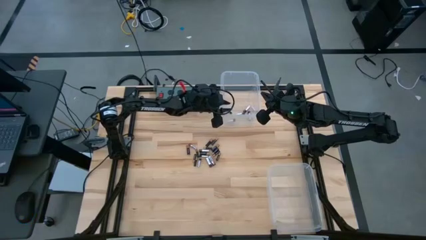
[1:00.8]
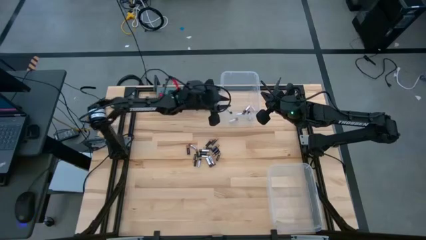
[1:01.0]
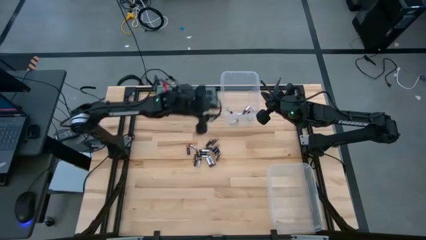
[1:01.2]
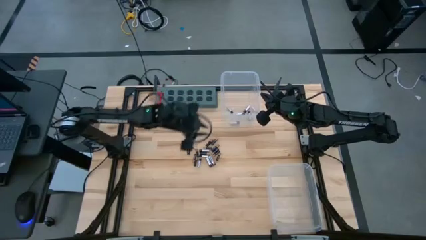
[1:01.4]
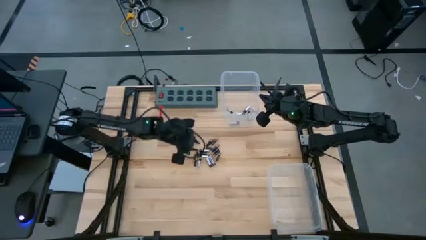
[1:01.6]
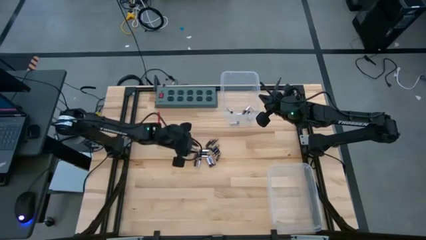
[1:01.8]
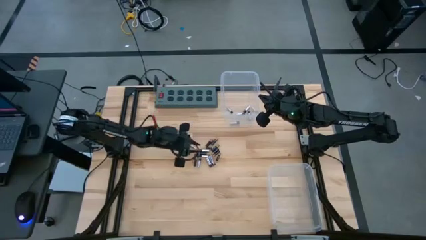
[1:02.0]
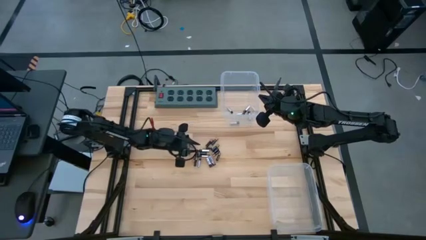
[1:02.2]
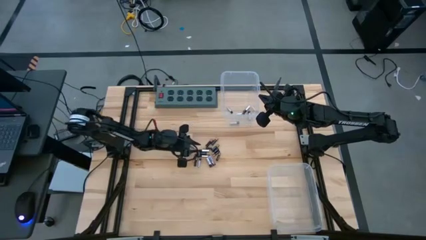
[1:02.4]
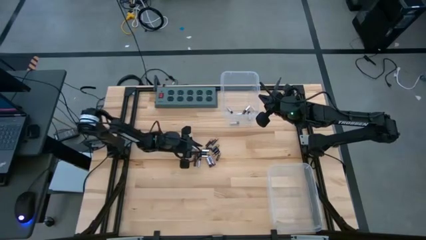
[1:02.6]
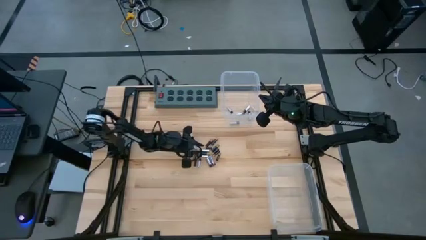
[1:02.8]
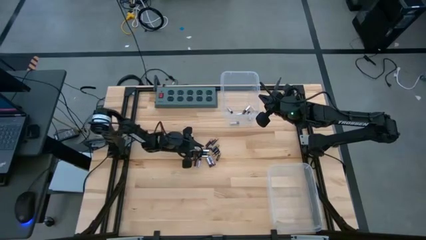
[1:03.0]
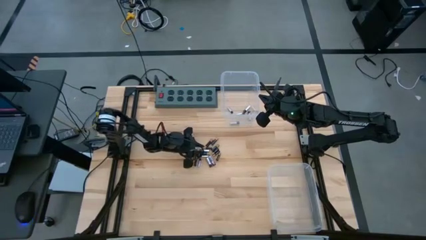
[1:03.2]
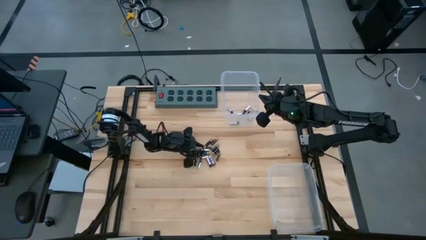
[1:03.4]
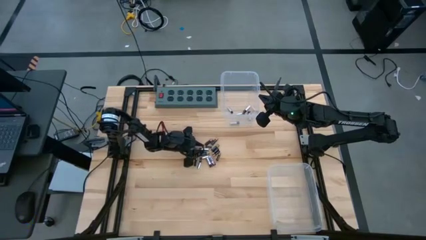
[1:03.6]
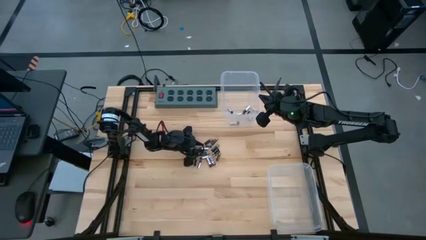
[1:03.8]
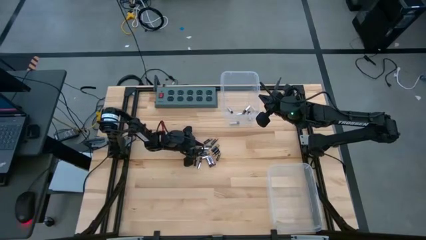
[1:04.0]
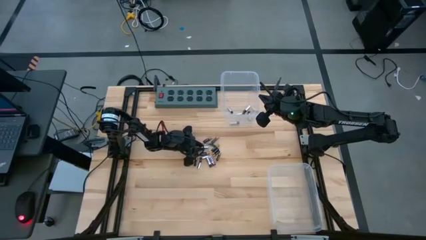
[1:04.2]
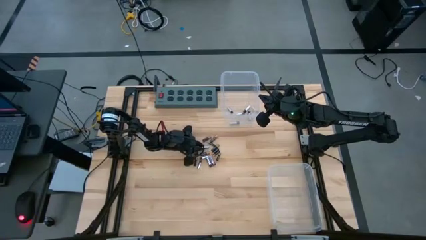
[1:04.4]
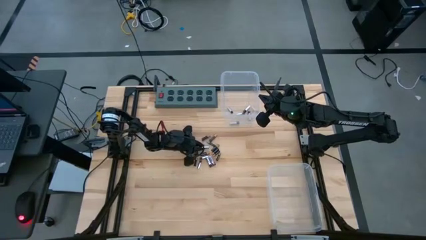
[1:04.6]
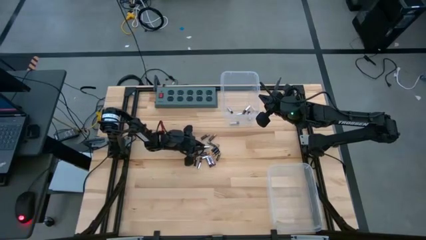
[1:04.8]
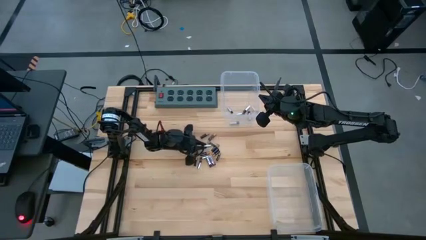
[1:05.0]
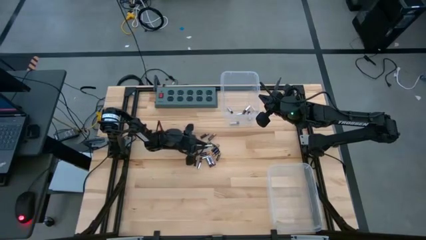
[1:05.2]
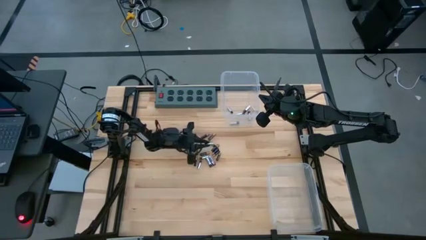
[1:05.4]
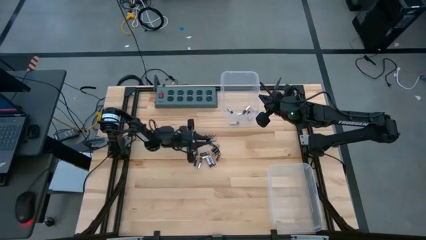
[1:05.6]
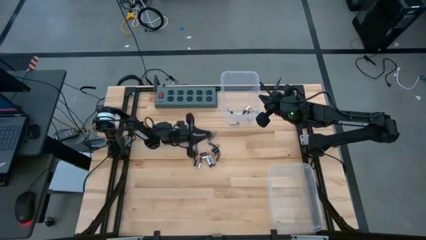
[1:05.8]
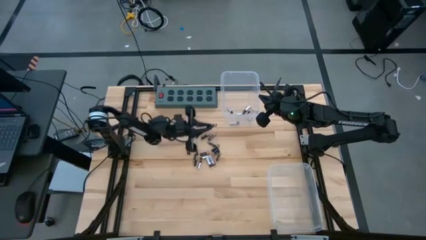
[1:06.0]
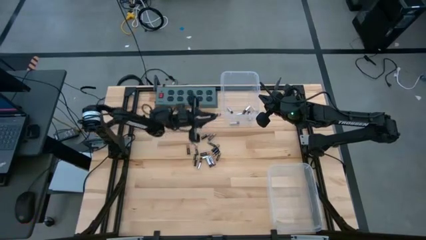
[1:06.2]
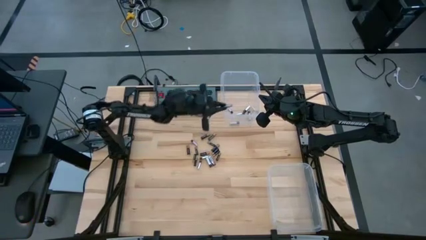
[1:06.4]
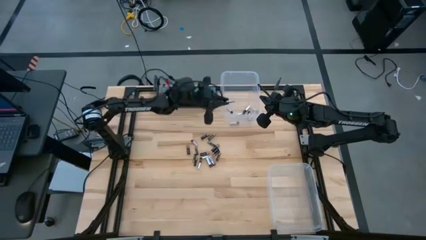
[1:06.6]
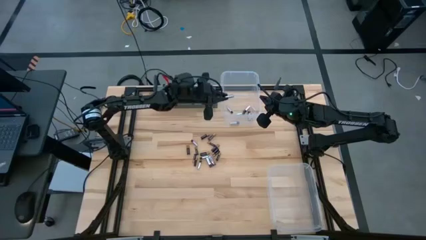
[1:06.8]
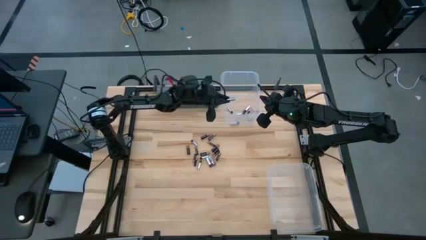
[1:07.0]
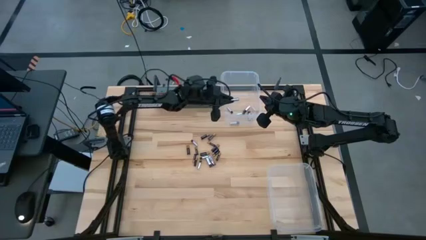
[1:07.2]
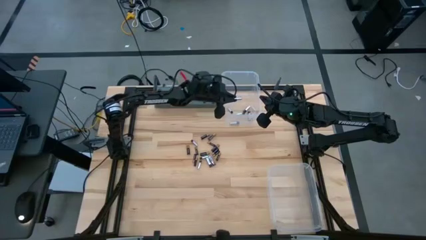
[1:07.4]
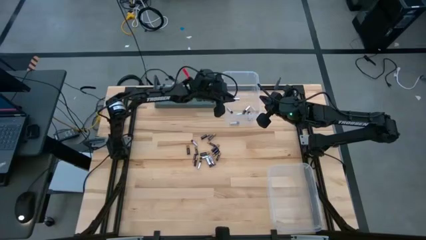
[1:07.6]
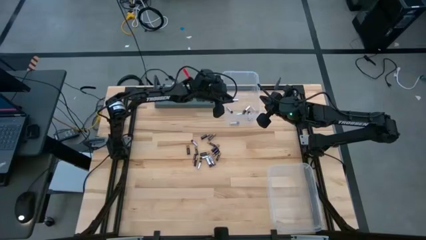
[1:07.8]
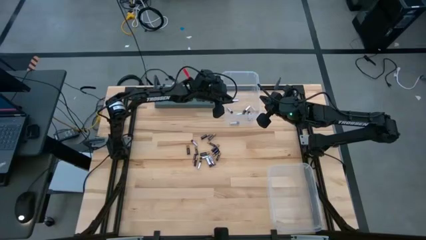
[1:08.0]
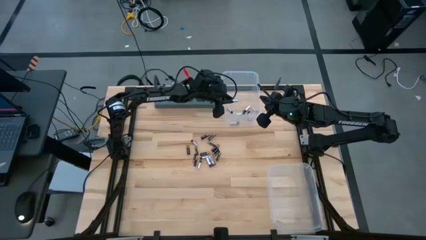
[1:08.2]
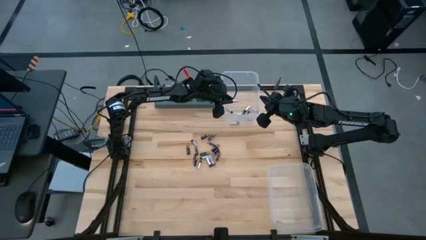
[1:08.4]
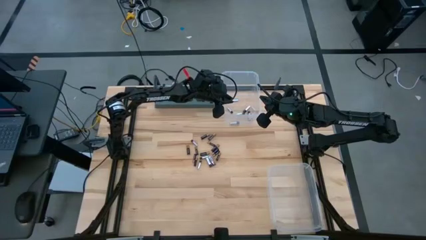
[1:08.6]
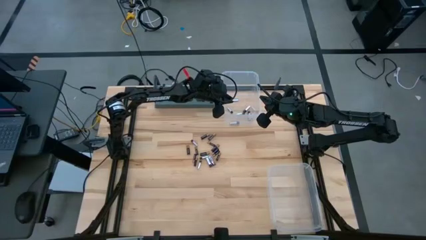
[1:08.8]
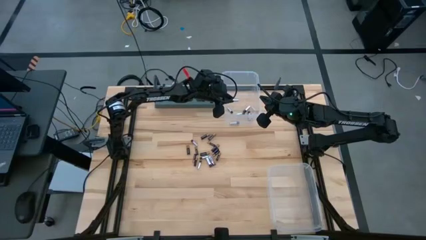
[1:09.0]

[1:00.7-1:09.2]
Task: Sort batteries
Put the silver battery into the top transparent bin

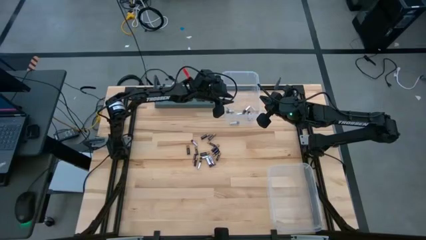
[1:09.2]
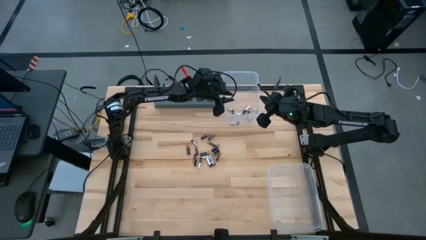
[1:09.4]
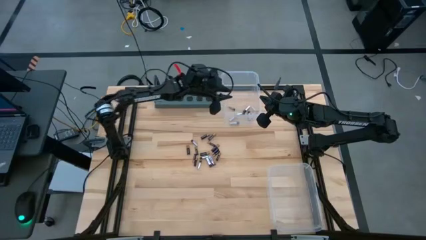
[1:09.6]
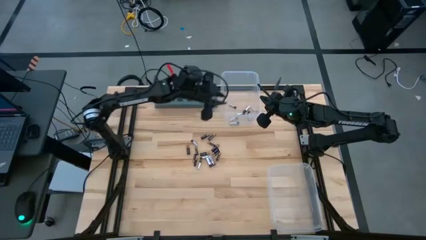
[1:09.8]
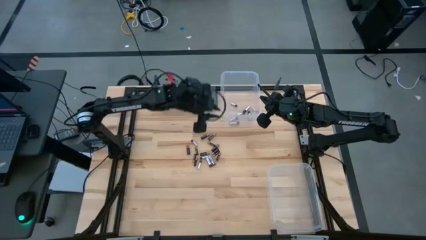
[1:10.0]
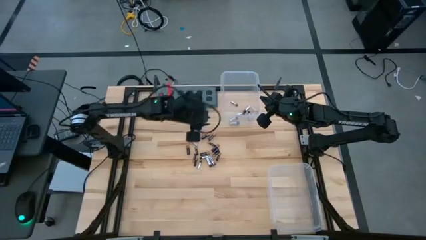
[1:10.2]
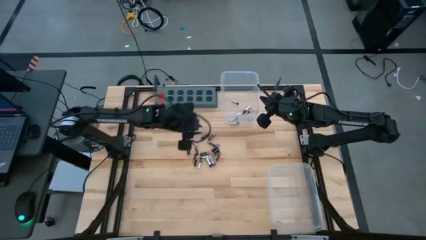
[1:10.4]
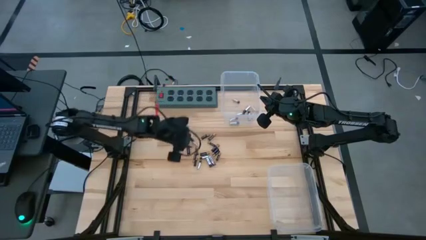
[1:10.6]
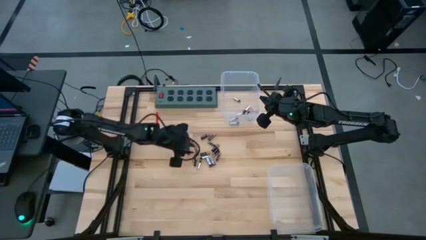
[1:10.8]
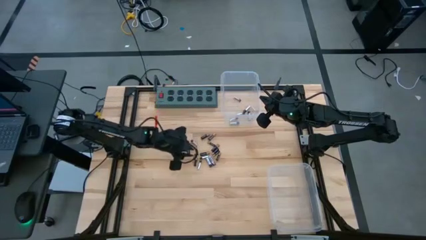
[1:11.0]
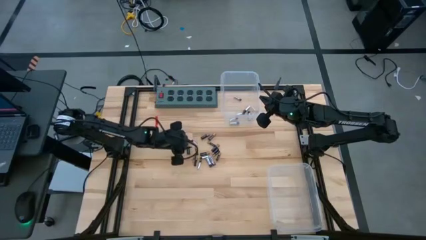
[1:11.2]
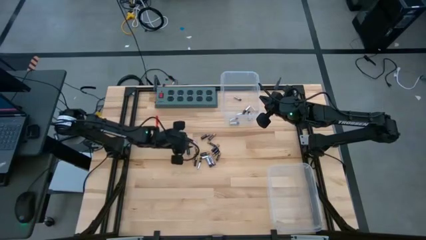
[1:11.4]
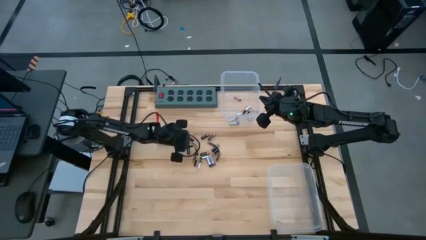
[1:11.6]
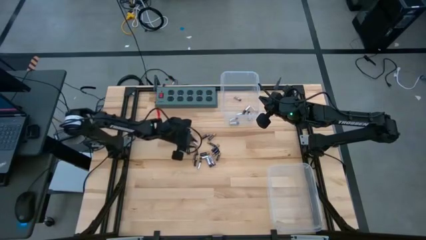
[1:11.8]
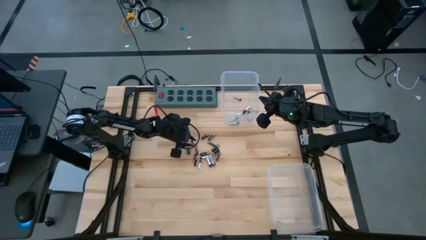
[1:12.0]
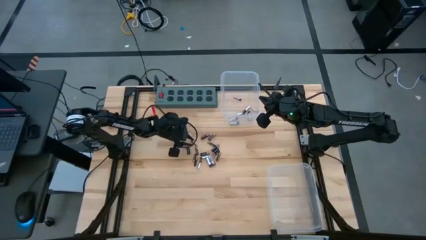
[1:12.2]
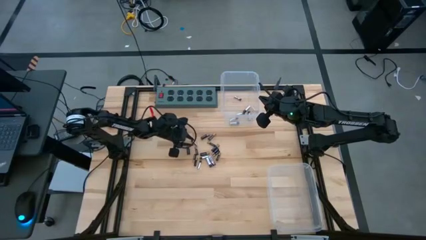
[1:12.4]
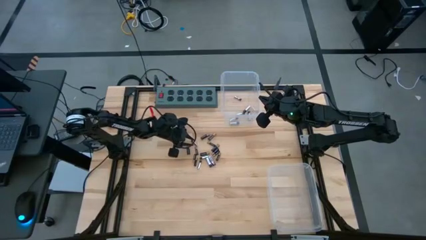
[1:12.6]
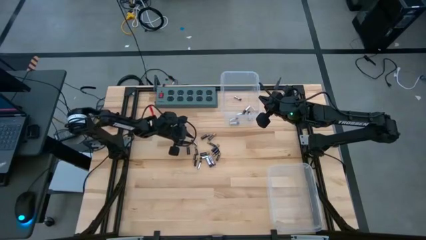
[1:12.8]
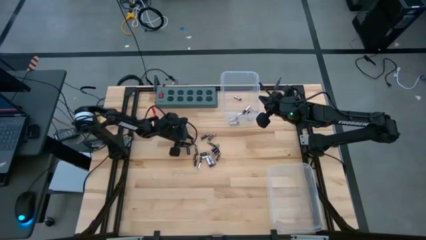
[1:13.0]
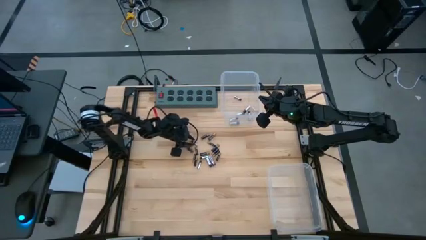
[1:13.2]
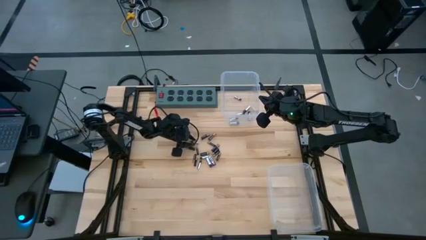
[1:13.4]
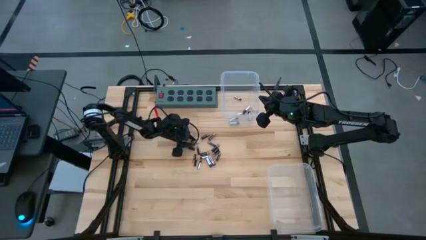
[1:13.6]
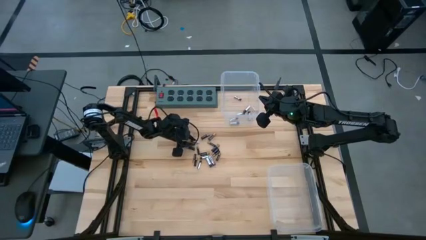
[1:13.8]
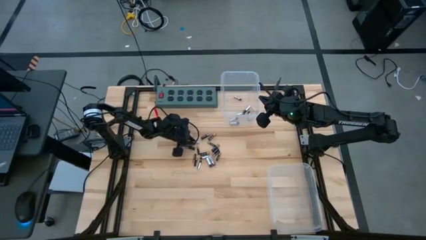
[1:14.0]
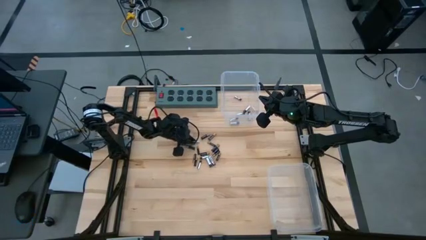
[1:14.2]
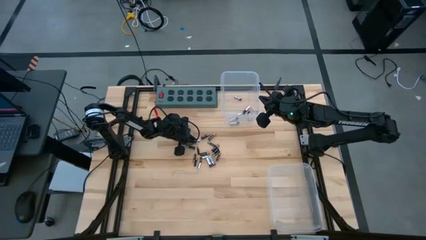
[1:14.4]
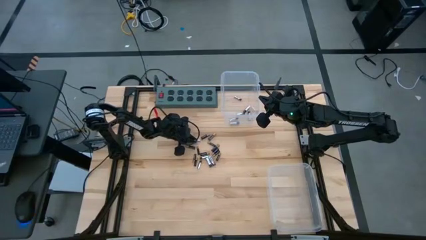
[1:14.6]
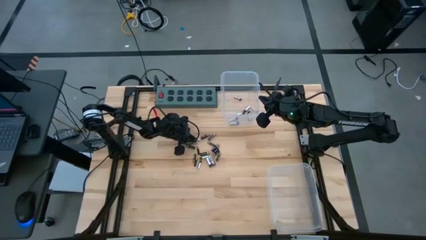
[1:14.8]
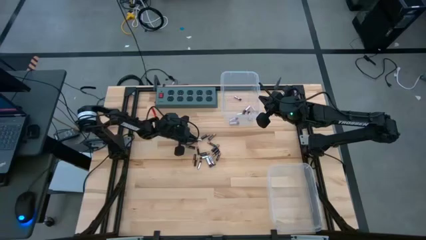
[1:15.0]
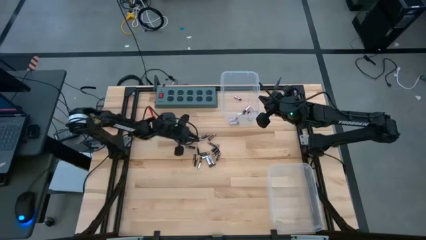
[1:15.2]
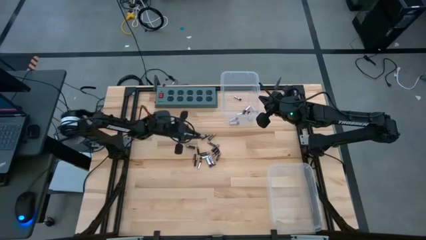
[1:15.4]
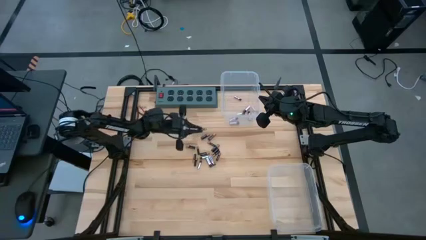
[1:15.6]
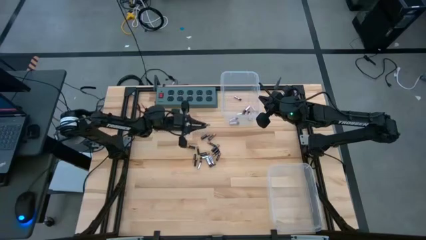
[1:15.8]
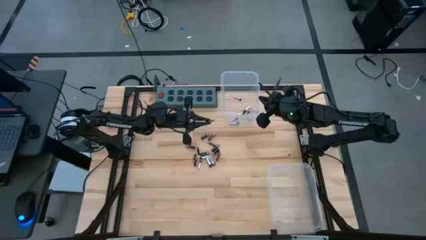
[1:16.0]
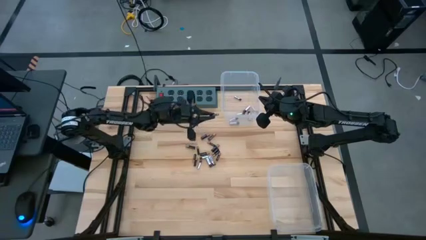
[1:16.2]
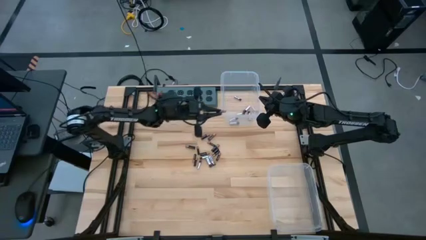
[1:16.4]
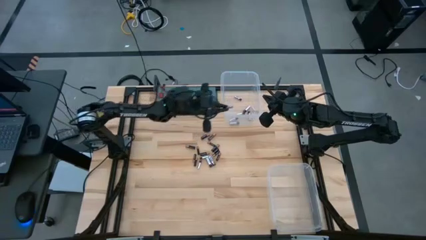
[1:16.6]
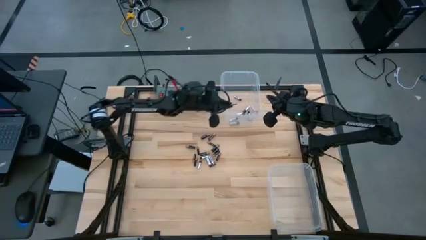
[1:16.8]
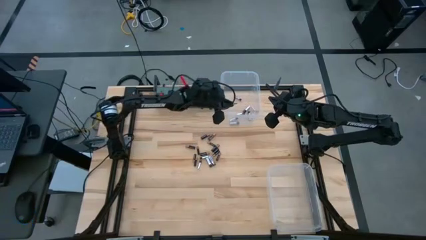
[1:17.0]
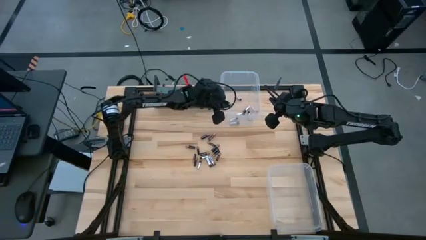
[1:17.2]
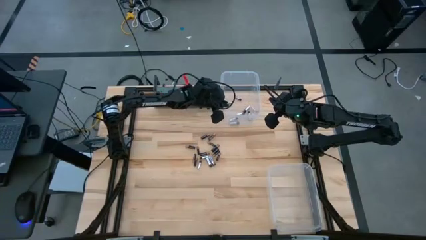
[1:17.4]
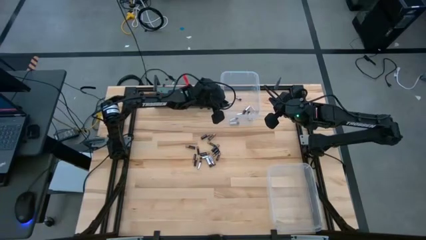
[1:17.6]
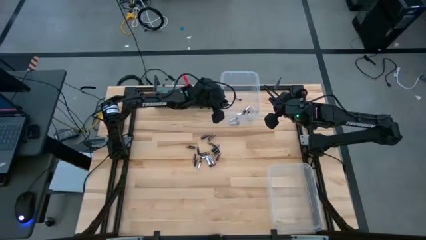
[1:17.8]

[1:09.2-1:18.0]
Put the silver battery into the top transparent bin
